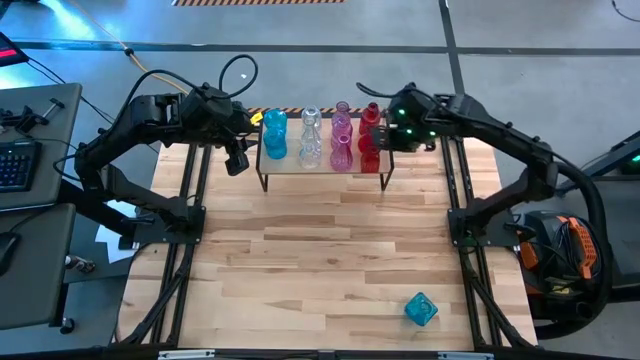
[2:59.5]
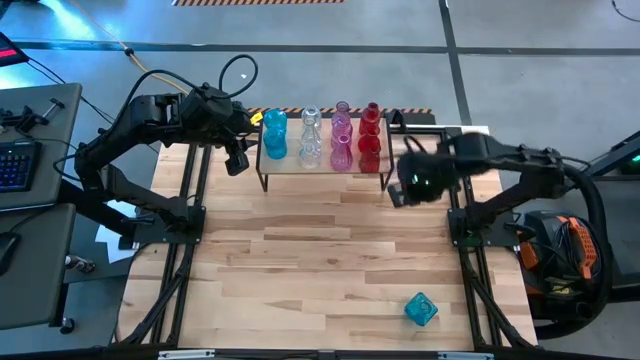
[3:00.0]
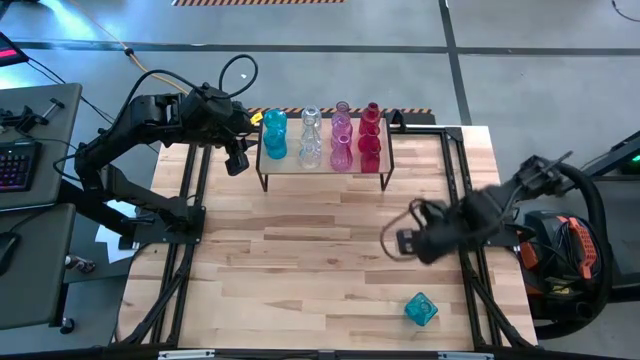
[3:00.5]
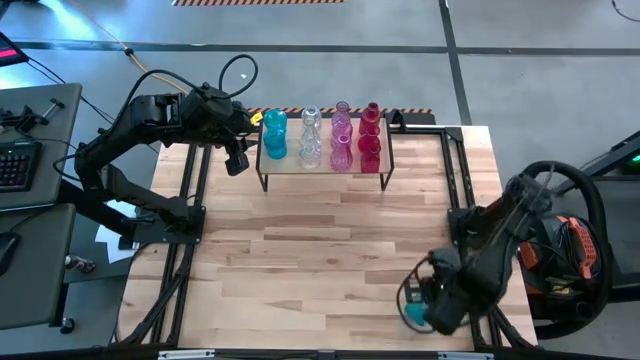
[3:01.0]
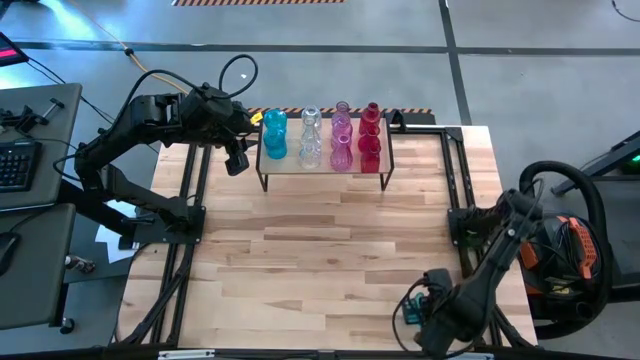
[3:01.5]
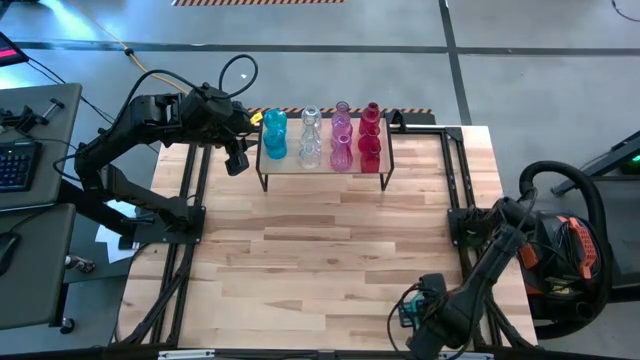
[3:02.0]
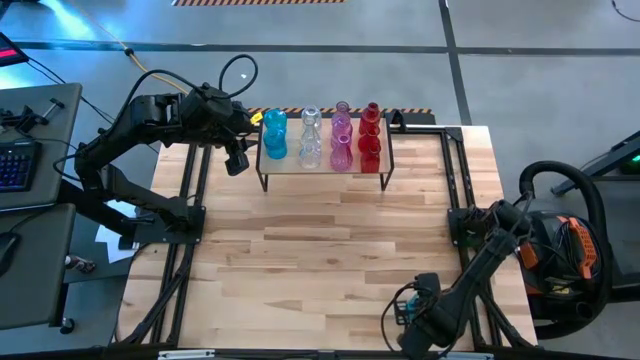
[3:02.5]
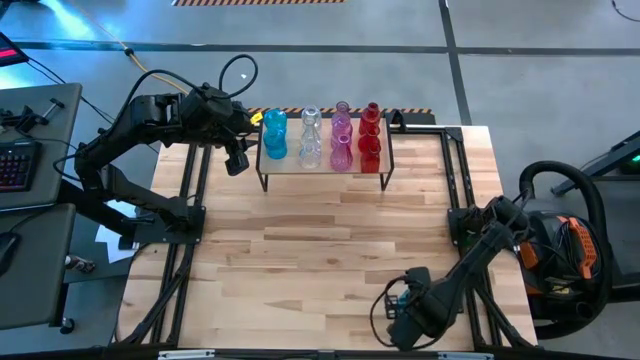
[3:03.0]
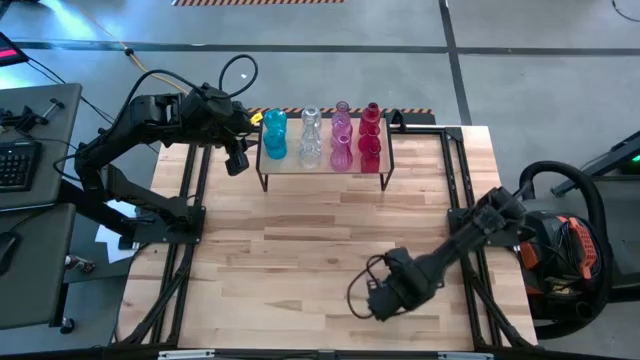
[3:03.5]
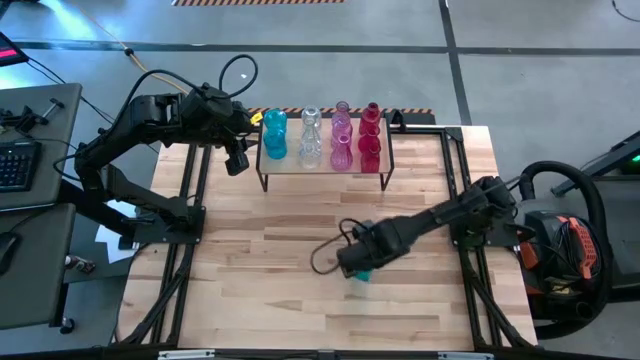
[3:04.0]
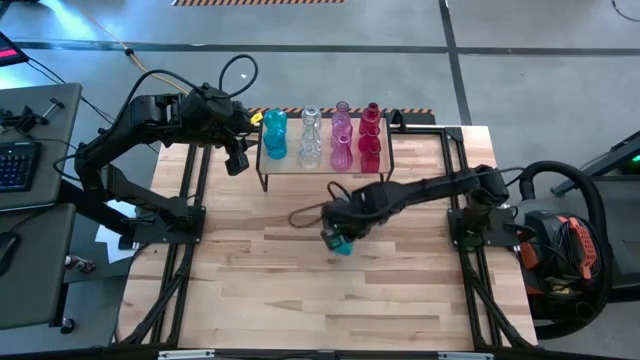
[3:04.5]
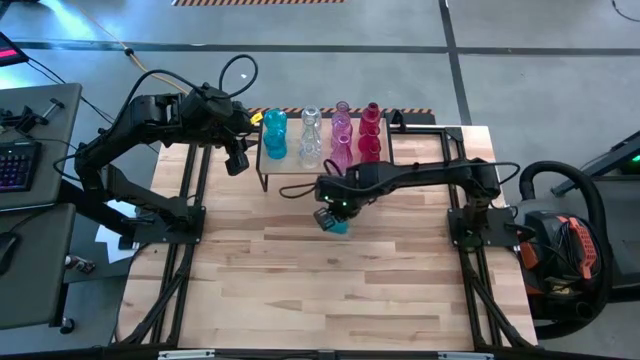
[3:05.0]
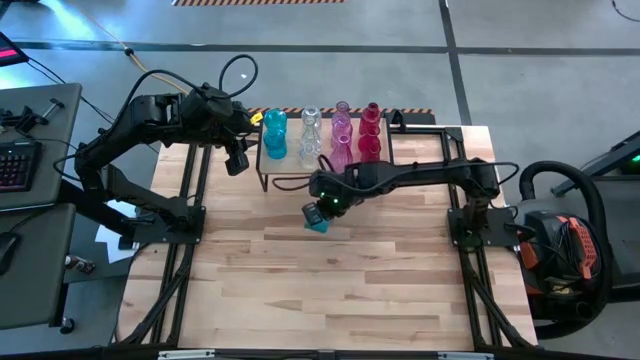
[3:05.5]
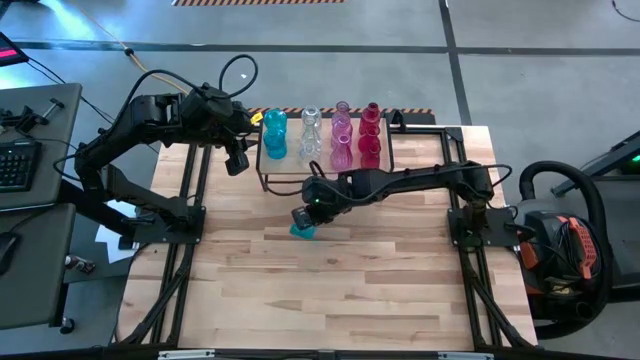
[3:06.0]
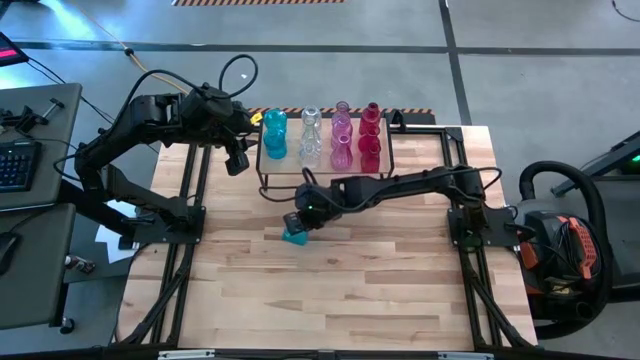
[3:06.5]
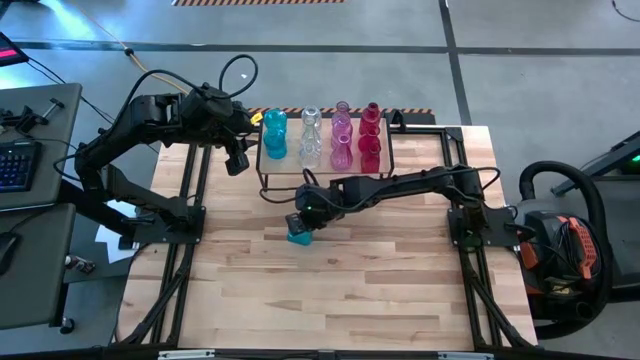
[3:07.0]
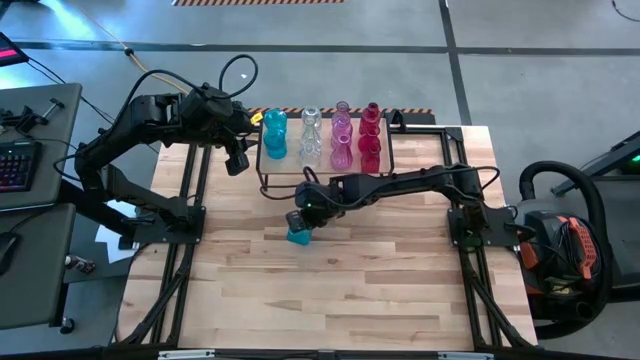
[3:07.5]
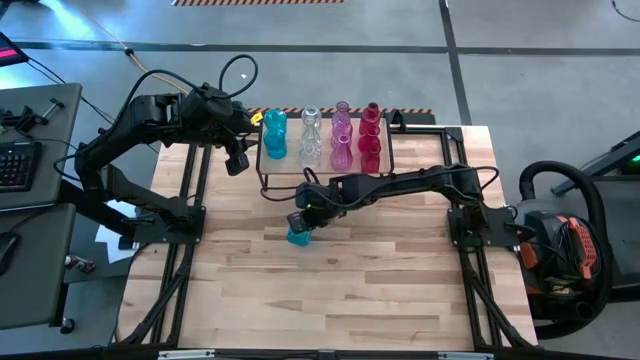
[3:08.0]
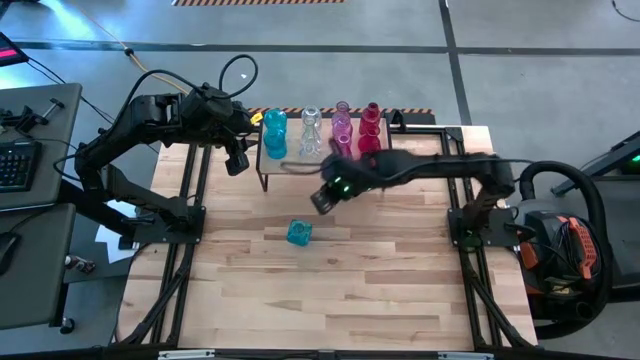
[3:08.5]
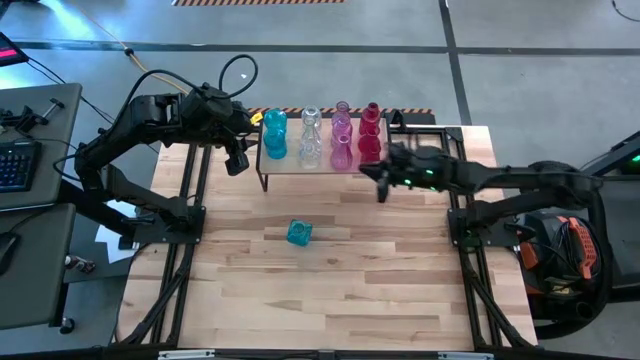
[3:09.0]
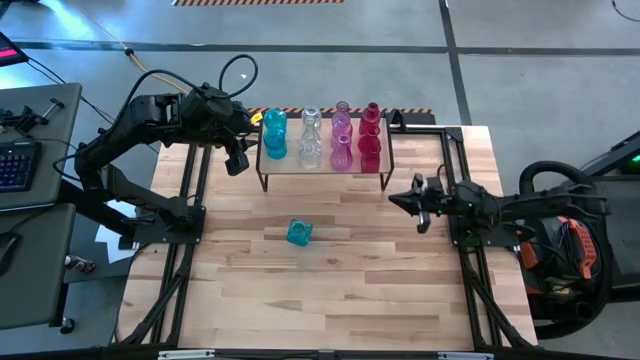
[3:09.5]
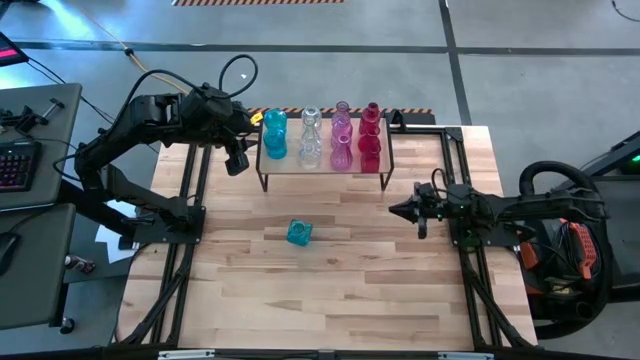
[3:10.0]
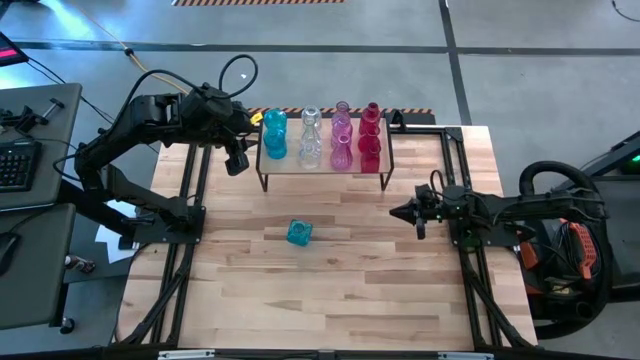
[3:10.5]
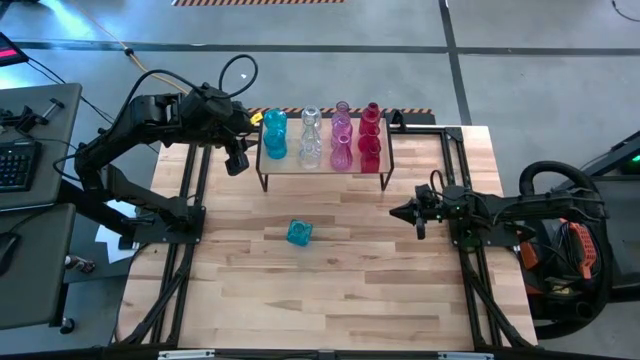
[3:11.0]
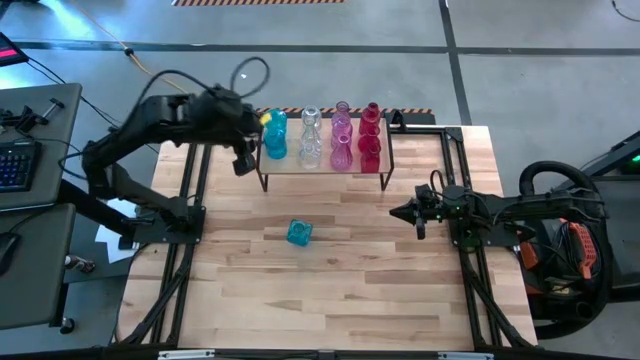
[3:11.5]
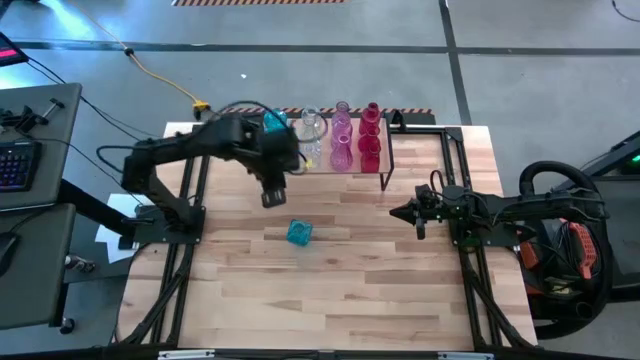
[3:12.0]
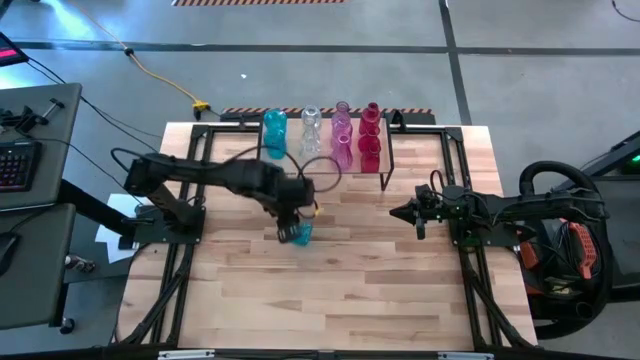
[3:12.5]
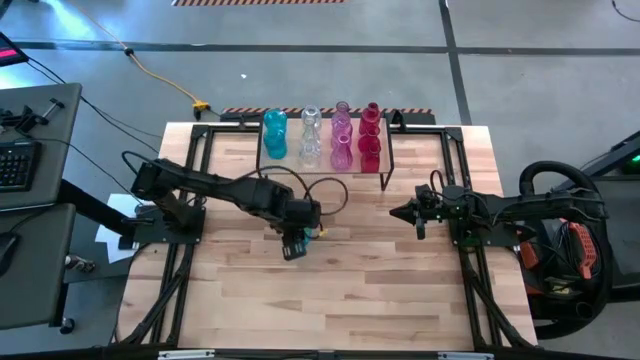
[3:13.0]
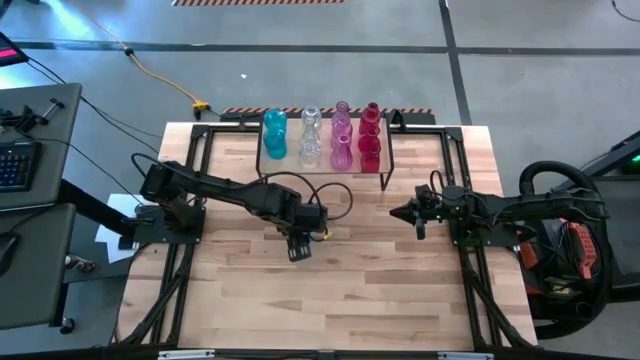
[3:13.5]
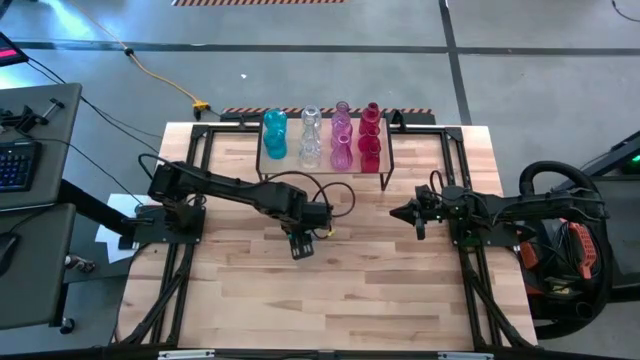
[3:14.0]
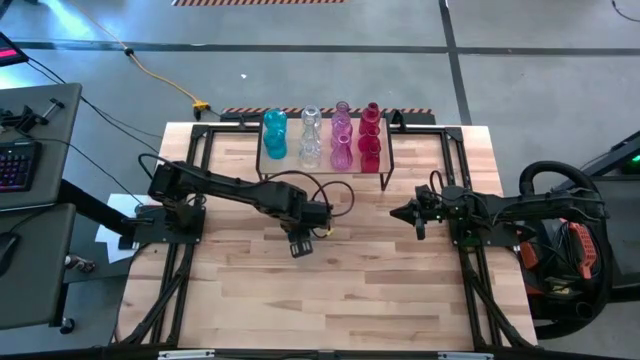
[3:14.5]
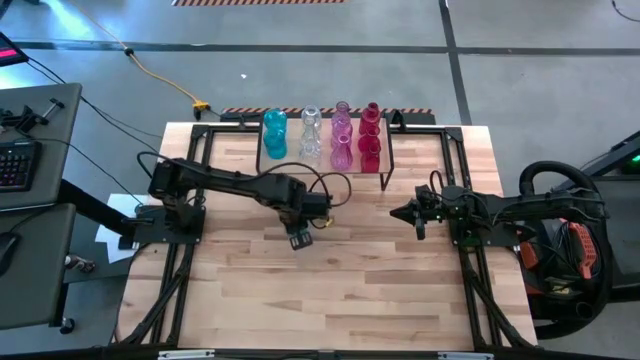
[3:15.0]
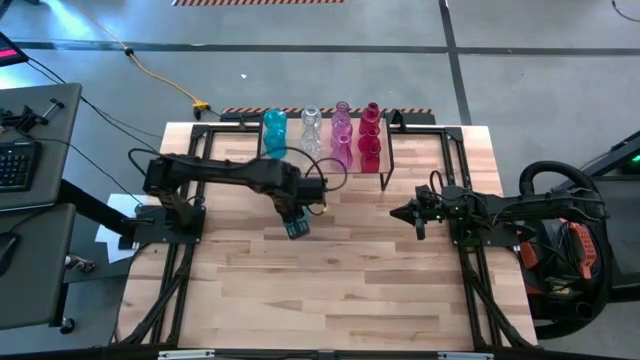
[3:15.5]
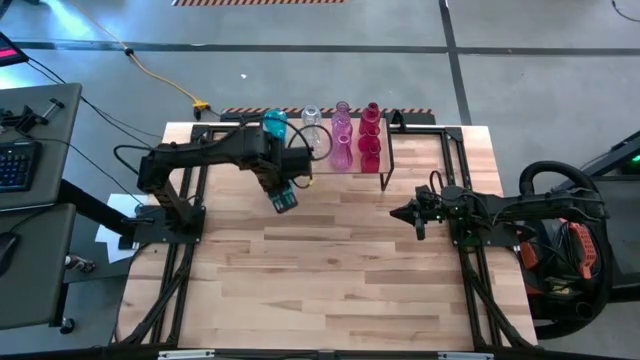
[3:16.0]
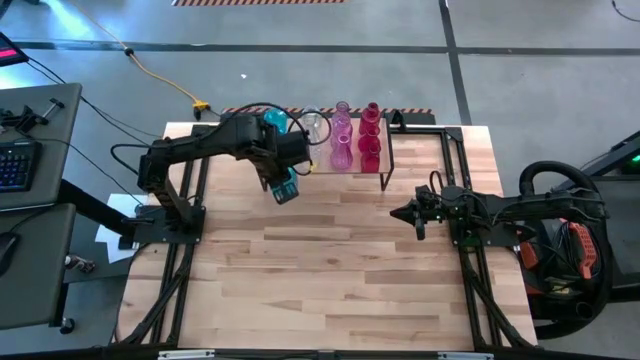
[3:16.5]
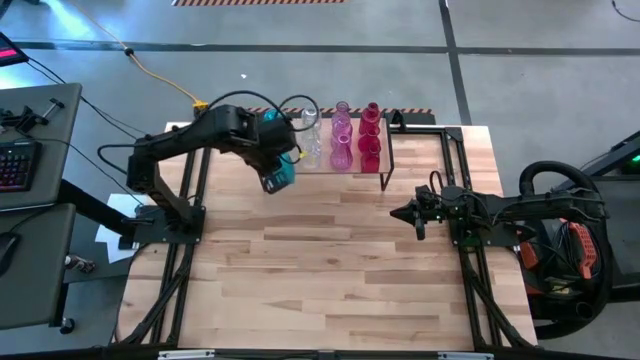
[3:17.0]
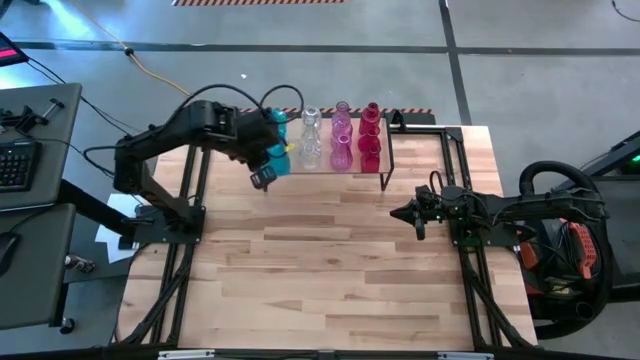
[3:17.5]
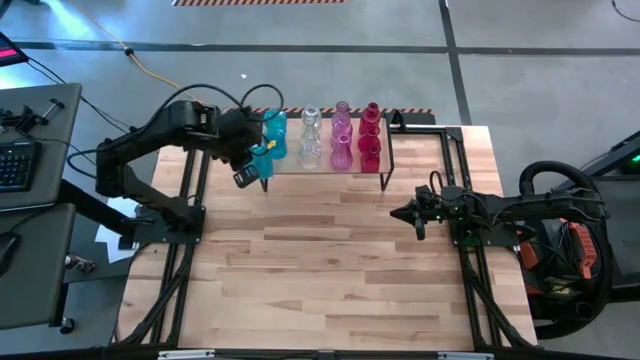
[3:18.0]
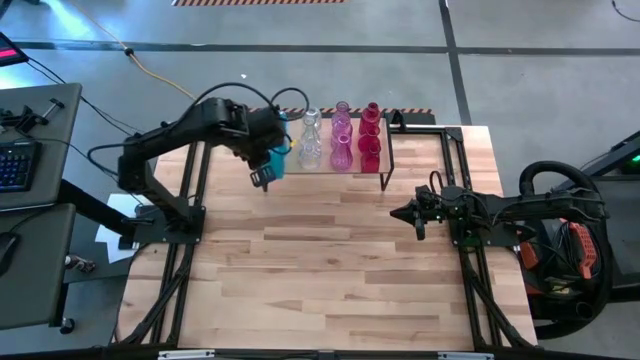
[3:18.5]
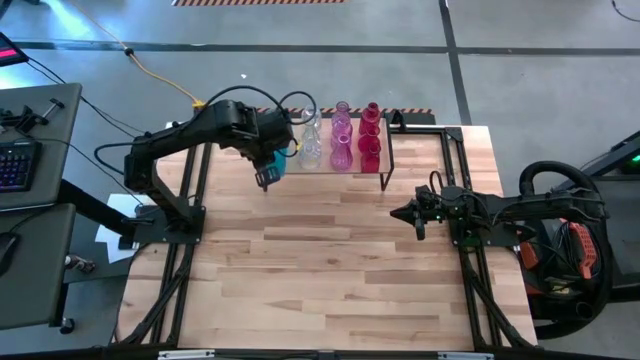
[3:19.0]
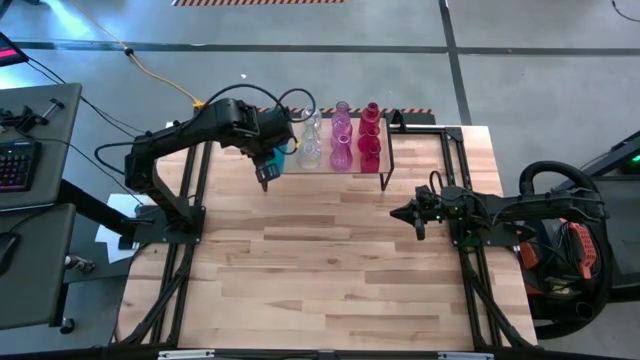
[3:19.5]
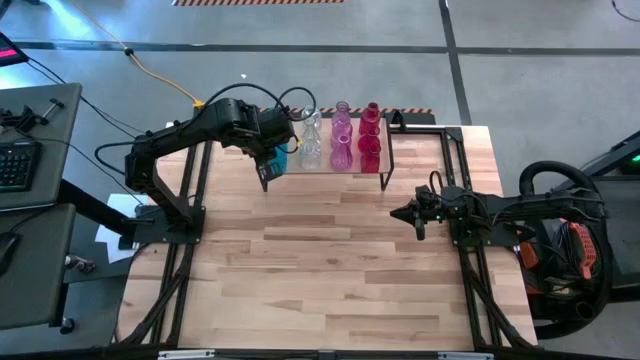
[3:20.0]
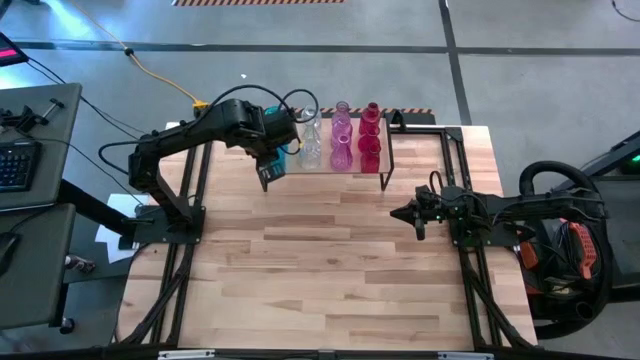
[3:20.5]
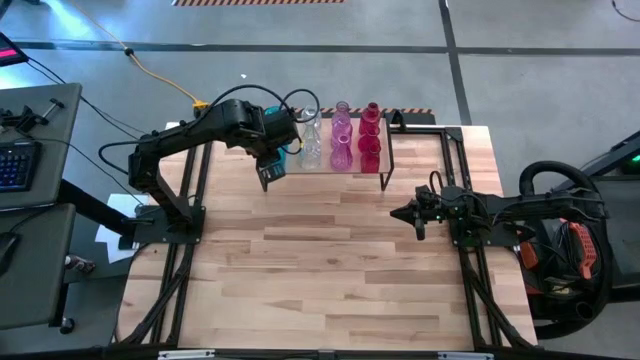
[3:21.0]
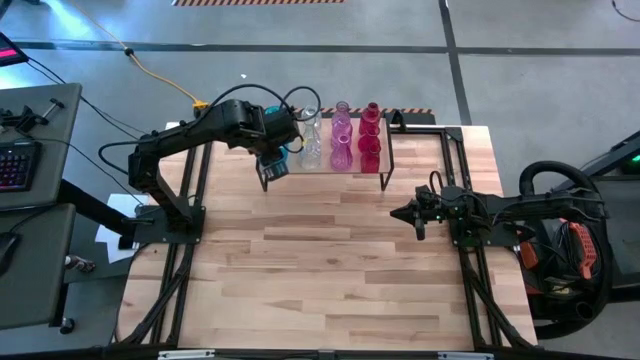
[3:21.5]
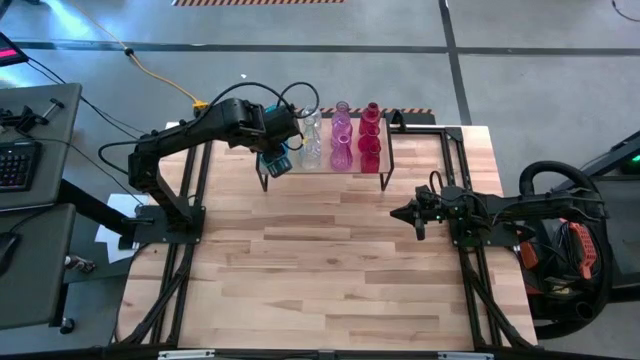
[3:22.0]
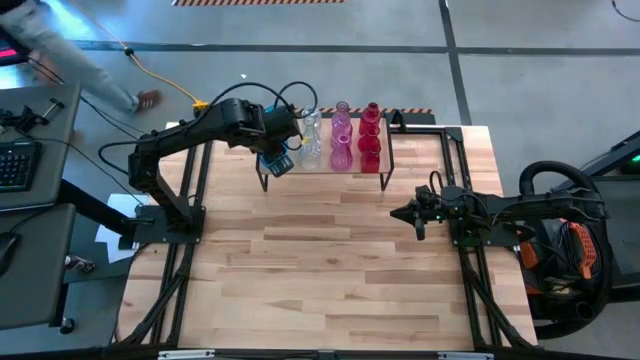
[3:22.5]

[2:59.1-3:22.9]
Task: sort vases onto shelf
Put the blue vase on the shelf aligned with the other blue vase
